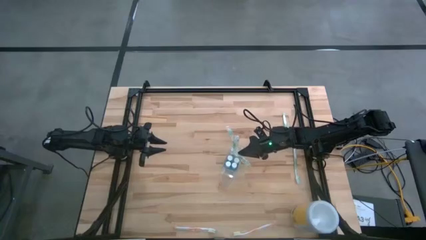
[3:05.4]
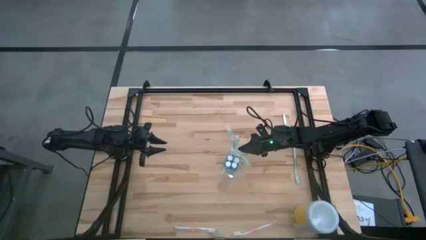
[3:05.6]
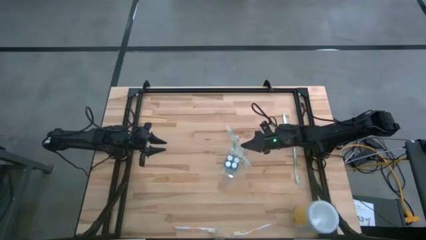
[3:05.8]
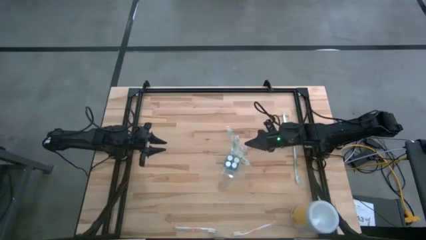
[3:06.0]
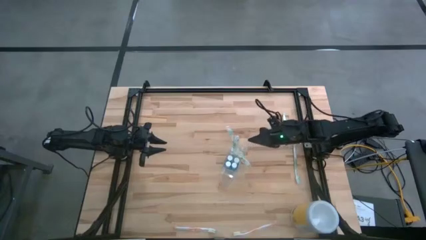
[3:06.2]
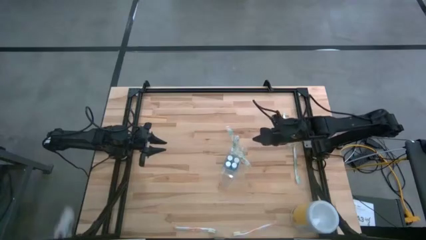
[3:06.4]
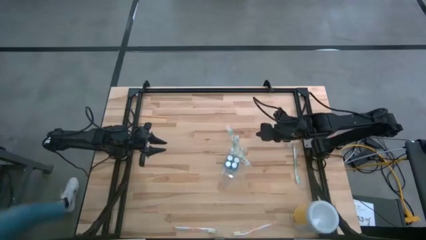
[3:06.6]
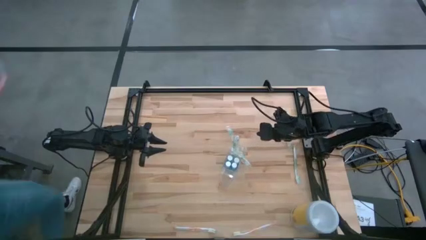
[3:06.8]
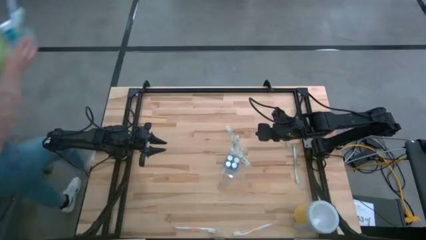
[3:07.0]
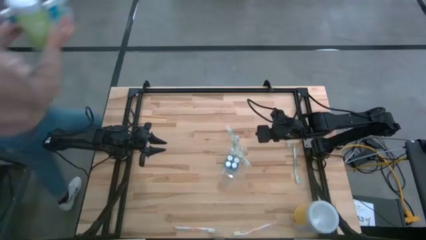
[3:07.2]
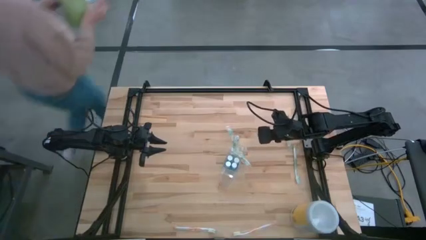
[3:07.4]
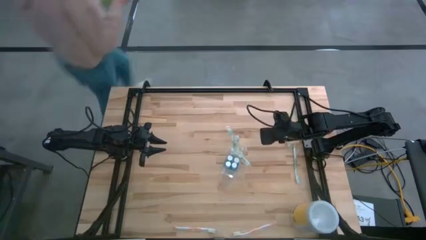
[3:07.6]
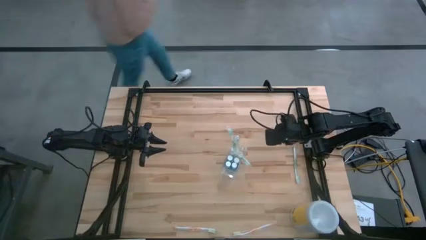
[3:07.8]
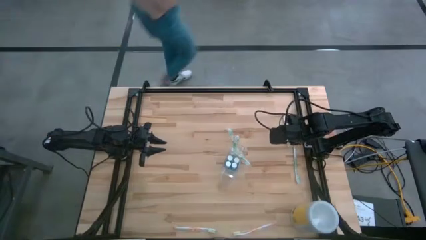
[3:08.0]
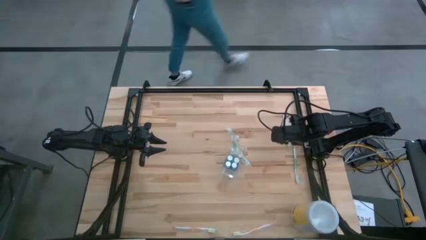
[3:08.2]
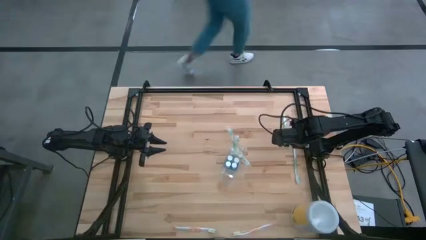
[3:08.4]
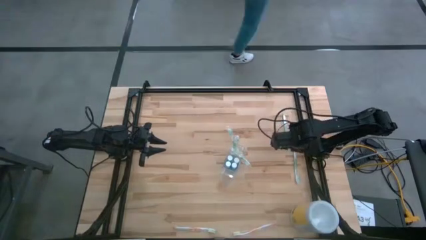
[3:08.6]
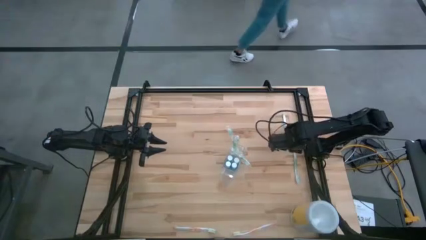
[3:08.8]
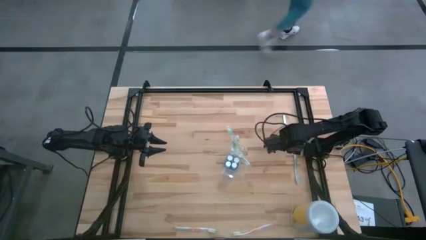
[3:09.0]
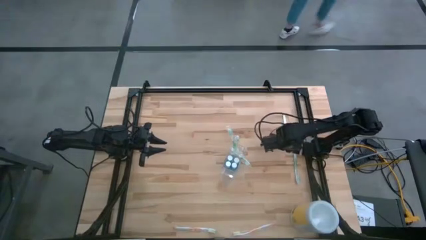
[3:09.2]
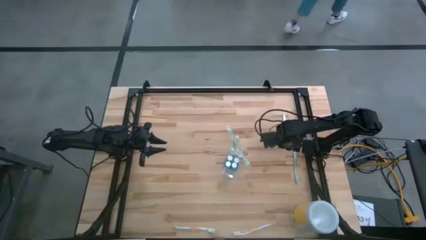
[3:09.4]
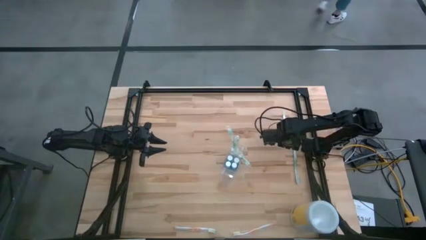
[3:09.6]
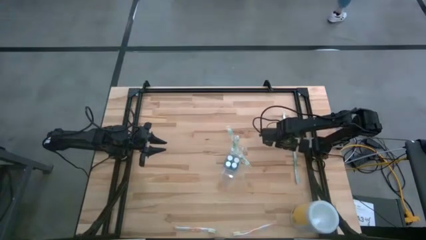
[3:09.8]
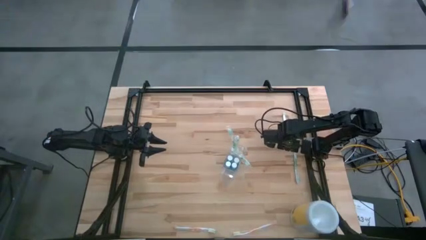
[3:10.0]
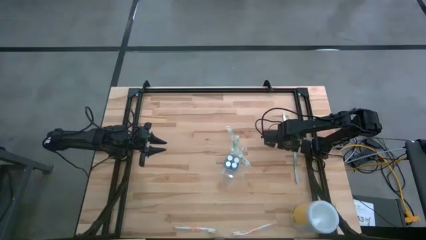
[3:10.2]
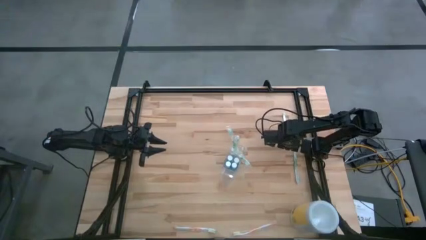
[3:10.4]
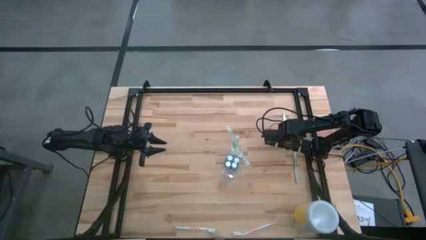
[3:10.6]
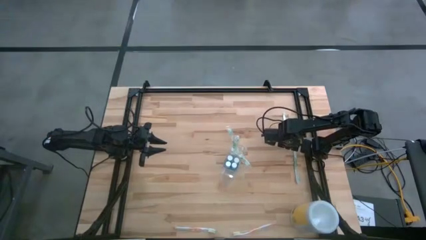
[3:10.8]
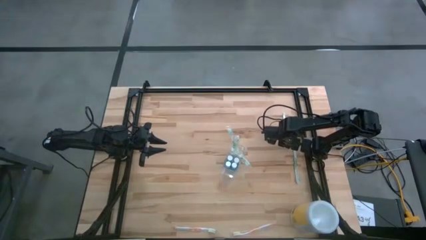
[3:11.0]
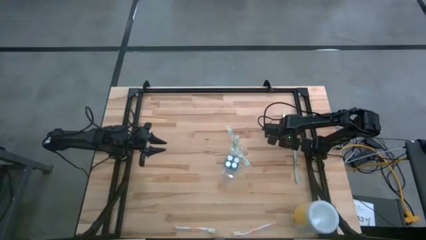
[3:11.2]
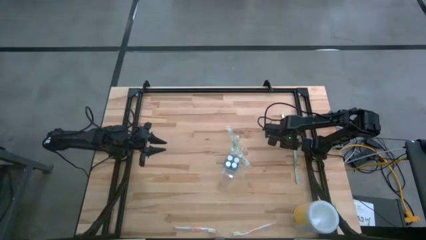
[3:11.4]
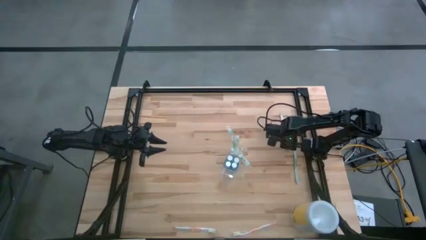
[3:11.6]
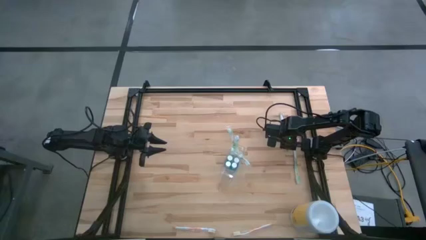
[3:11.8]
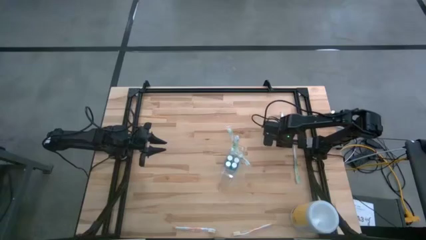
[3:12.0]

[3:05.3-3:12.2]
Task: Pick & Place toothbrushing station
Put the white green toothbrush into the back side of the transparent organizer

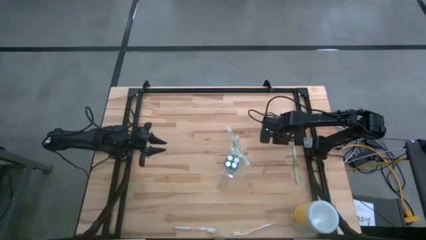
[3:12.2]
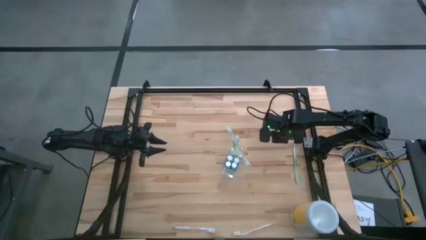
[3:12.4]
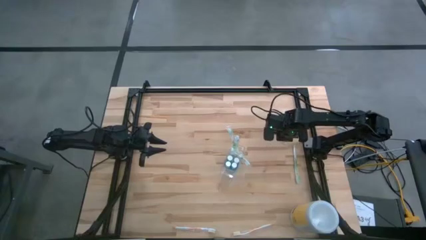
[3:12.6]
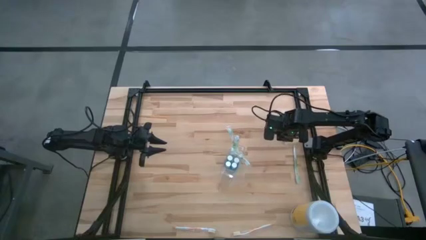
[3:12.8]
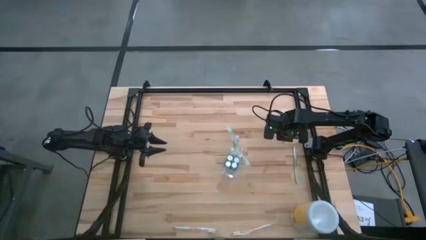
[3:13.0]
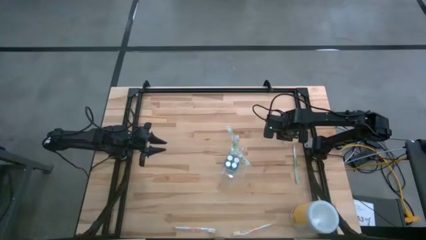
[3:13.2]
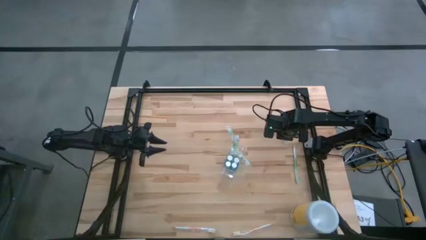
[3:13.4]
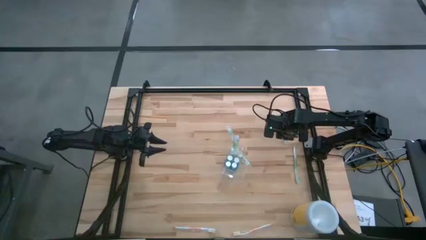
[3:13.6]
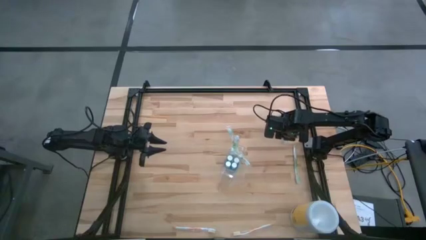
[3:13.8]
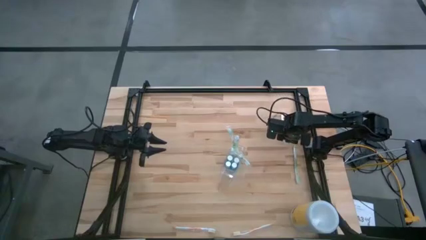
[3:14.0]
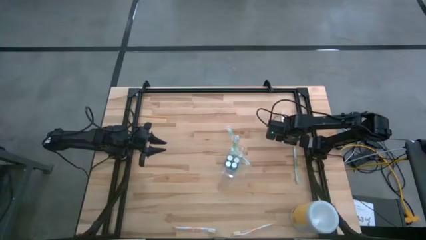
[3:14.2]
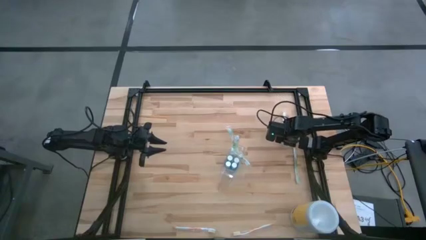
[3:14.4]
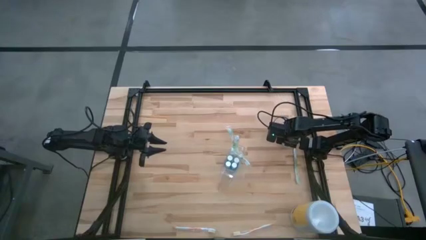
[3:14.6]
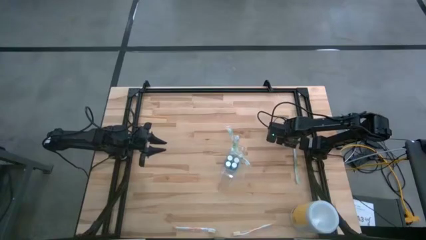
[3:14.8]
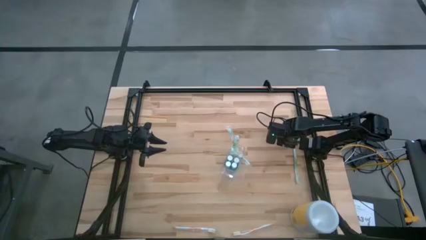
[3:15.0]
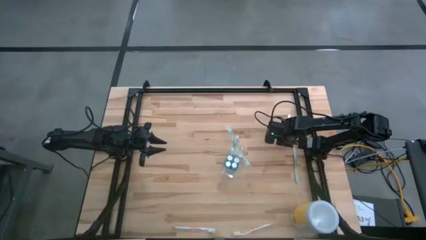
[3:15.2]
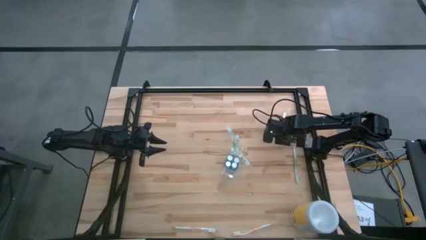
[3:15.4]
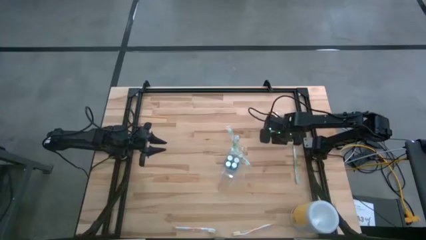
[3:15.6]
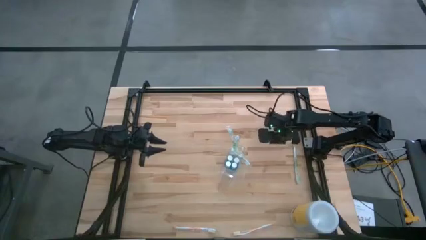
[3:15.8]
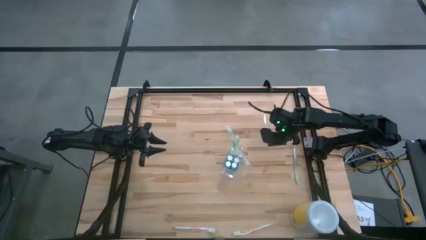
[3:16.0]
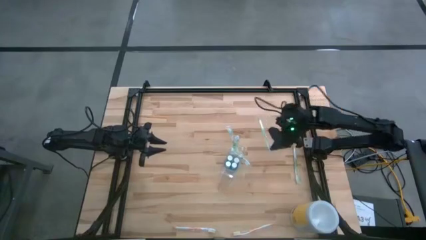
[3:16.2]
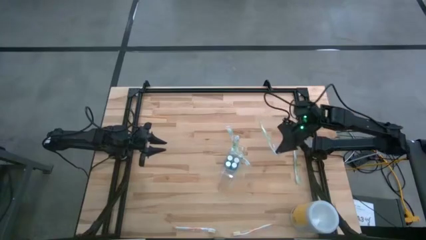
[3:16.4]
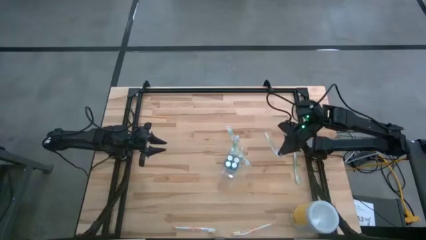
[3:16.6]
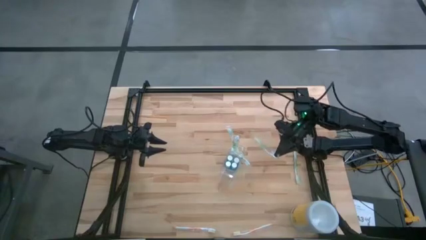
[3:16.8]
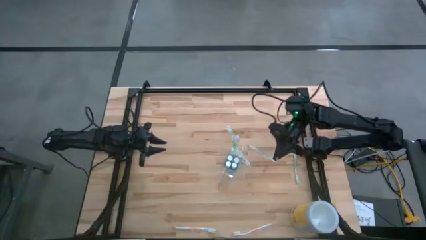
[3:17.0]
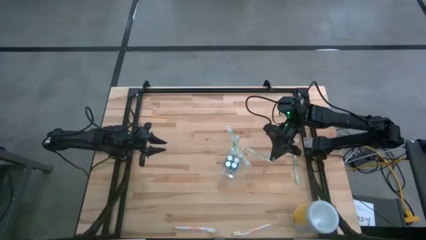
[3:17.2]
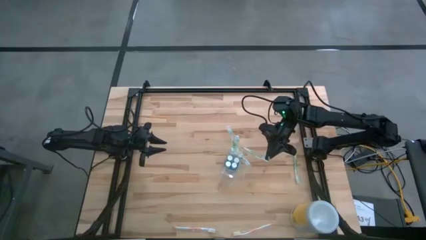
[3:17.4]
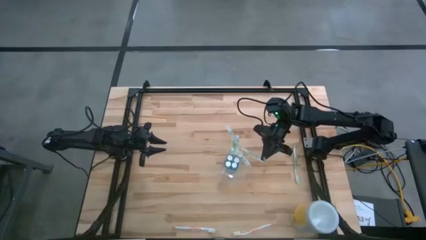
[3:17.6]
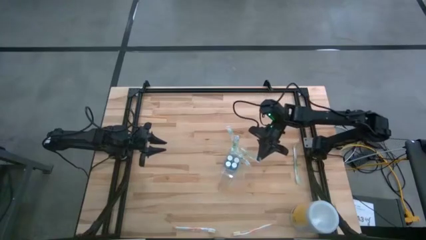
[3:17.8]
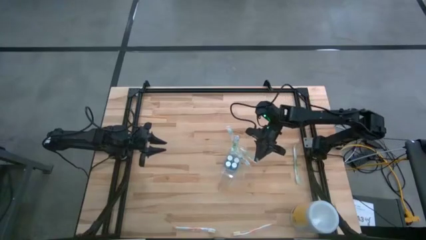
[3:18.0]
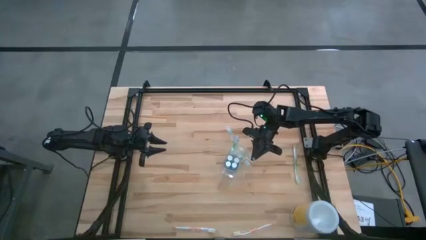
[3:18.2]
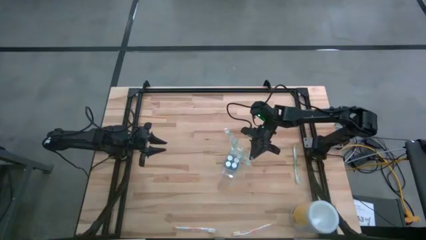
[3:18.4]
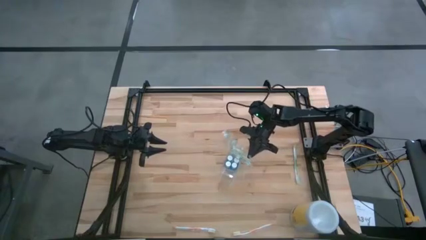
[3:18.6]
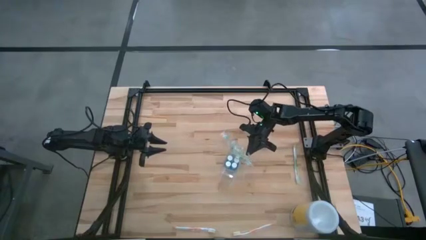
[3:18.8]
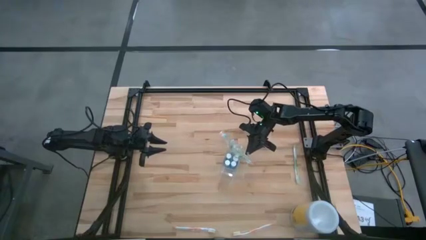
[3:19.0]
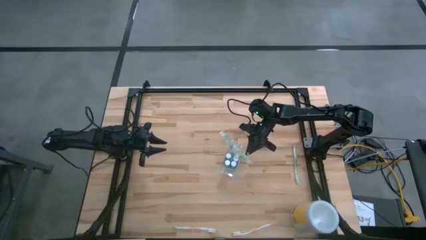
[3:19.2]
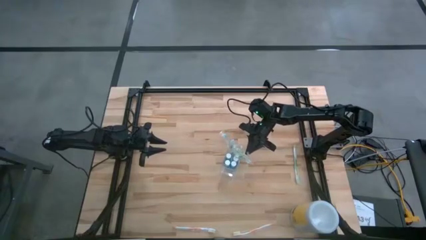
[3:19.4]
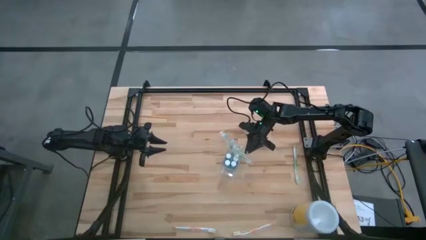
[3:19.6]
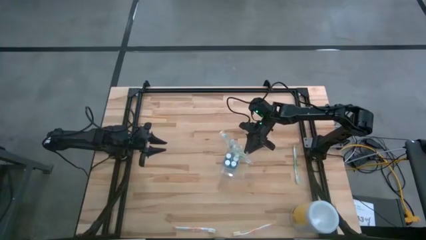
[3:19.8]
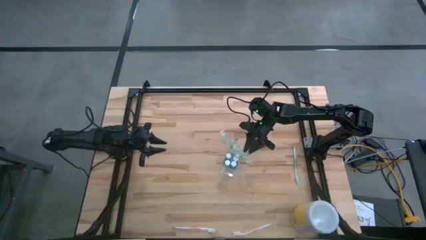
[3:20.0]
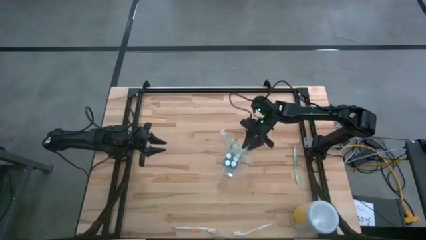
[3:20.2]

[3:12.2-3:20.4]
Put the white green toothbrush into the back side of the transparent organizer

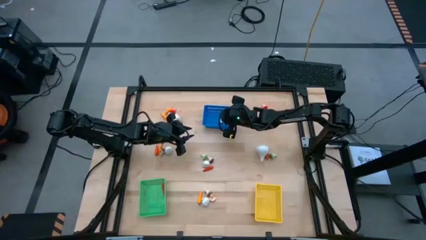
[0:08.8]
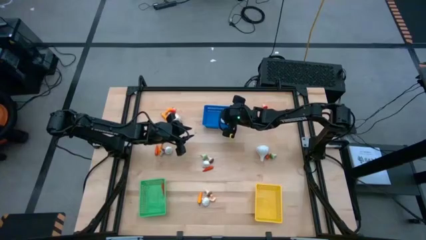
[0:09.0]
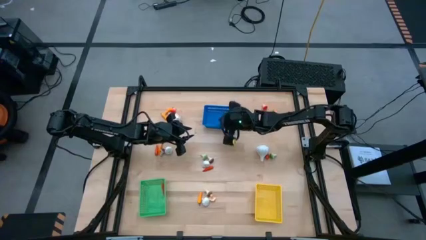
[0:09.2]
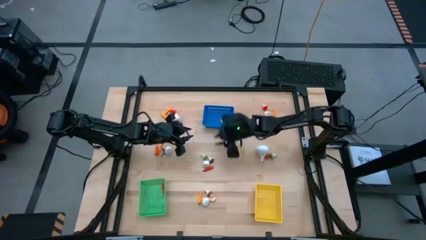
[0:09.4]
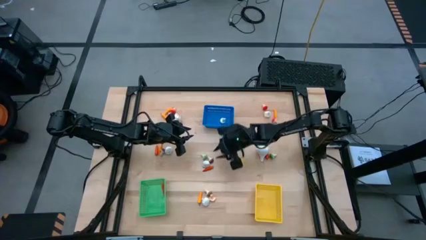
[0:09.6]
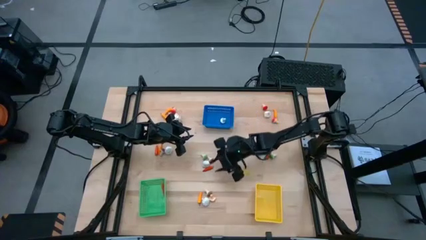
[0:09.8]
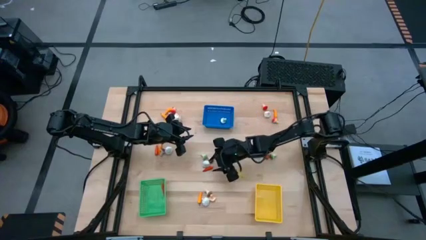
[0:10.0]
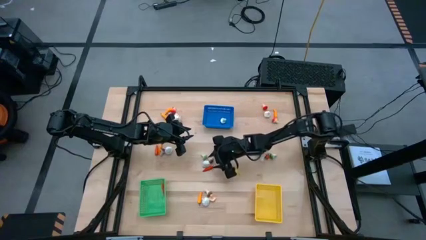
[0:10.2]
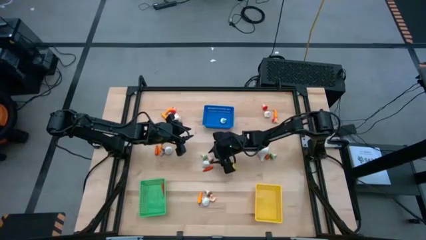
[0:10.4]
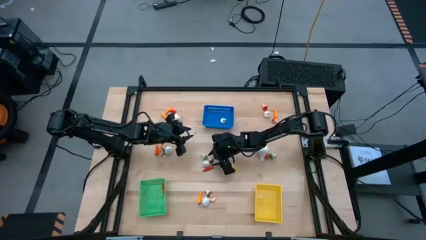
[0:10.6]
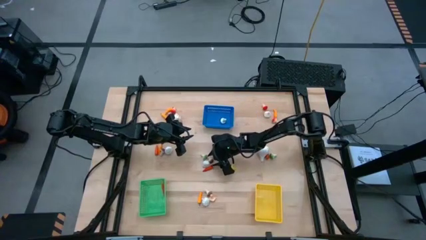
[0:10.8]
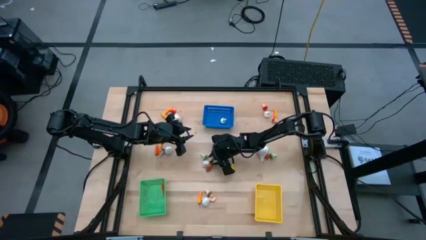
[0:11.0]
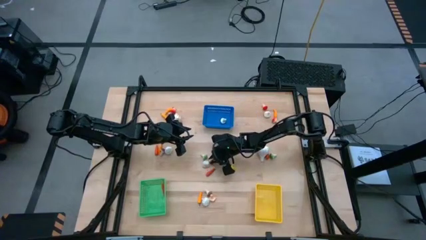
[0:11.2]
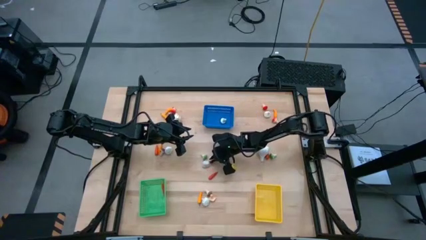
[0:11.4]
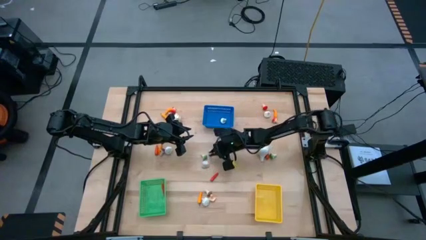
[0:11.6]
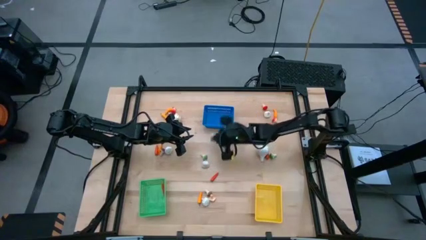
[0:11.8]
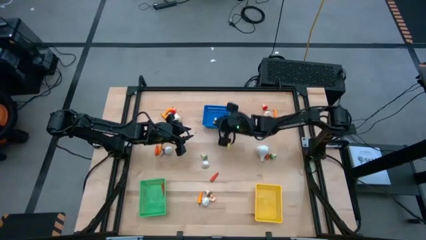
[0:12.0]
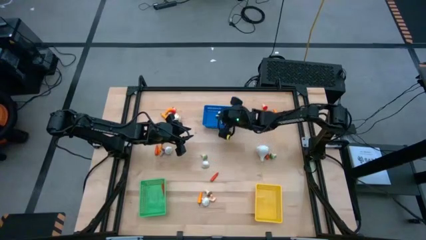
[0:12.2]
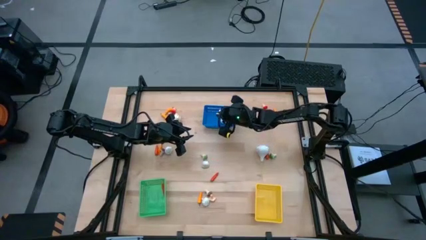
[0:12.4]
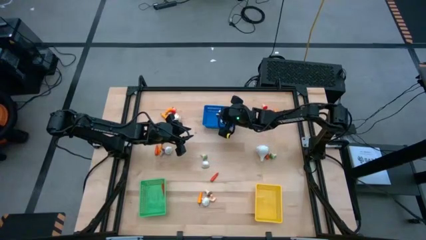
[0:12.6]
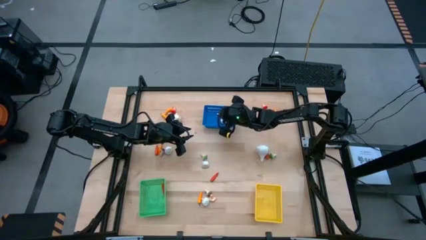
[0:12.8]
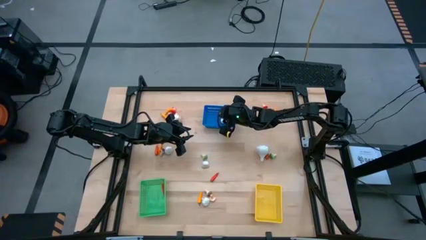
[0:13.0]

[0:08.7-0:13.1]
Task: Sort produce into baskets
Put the brown mushroom into the blue bin
